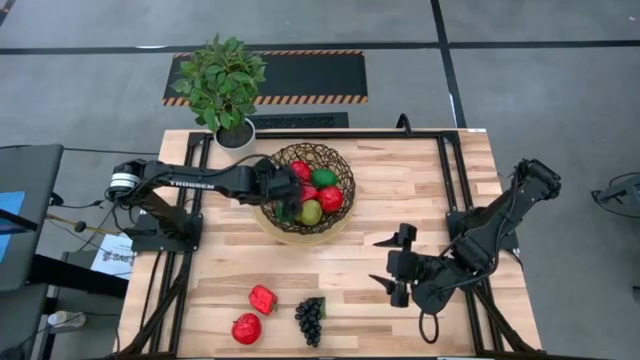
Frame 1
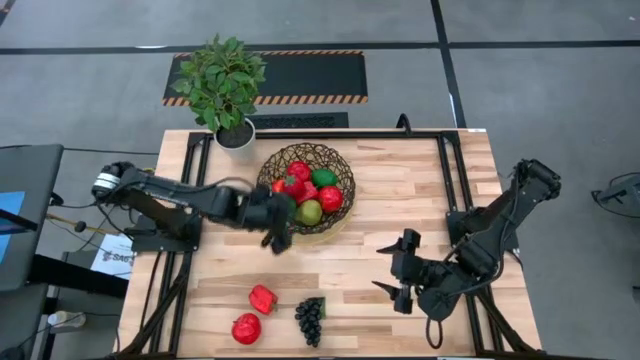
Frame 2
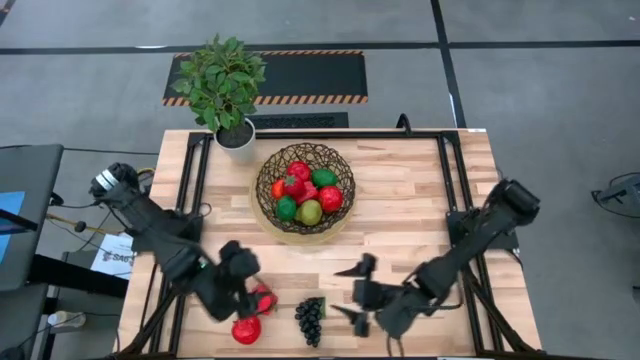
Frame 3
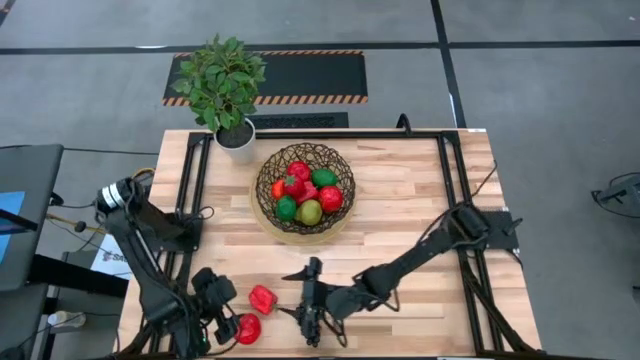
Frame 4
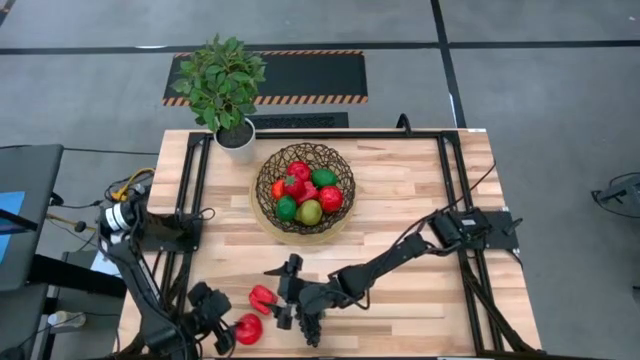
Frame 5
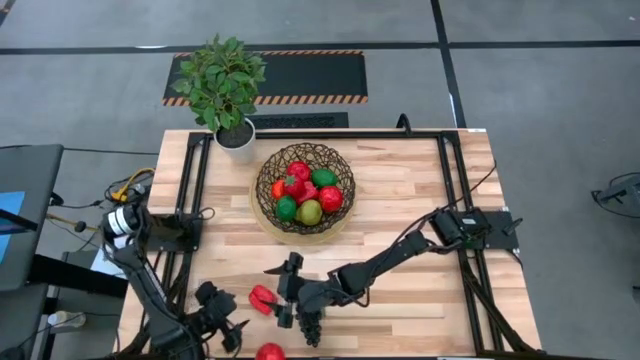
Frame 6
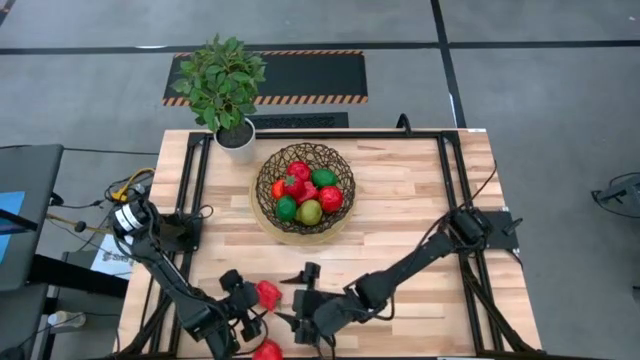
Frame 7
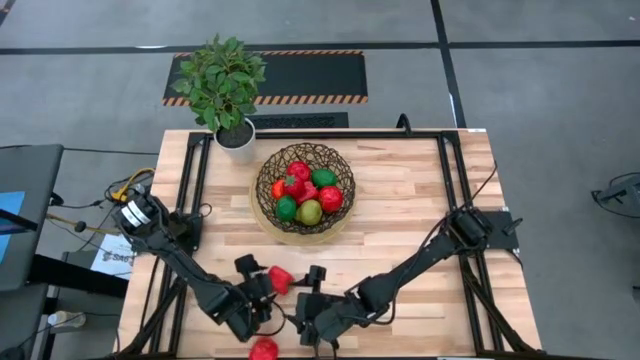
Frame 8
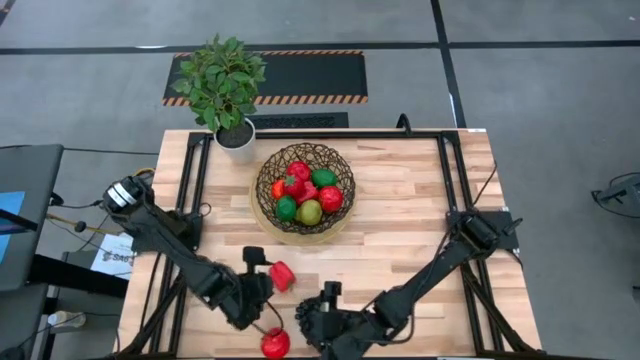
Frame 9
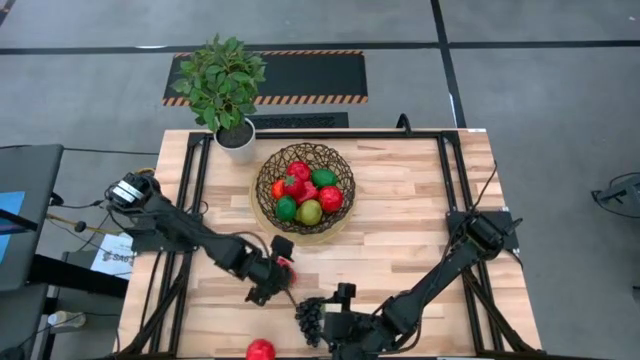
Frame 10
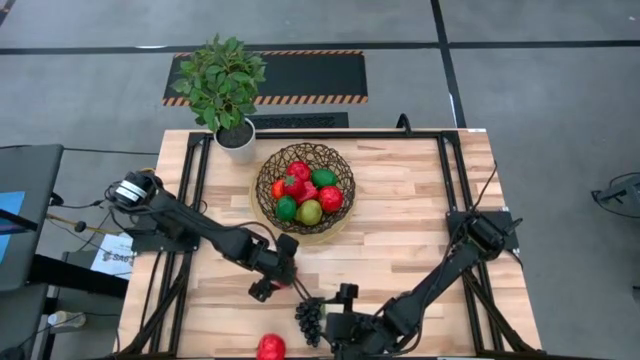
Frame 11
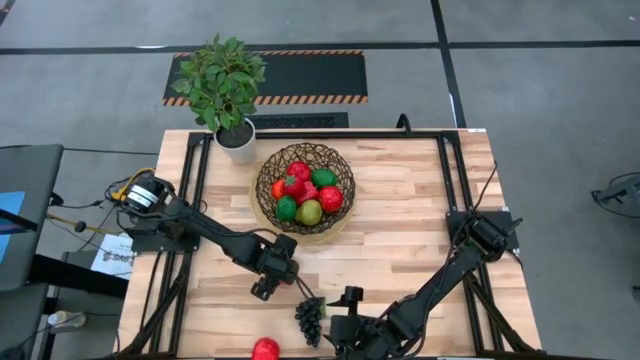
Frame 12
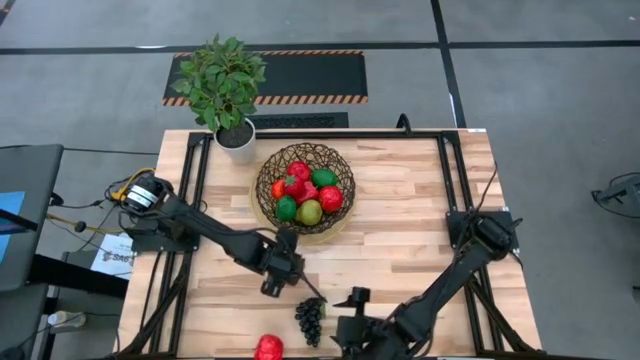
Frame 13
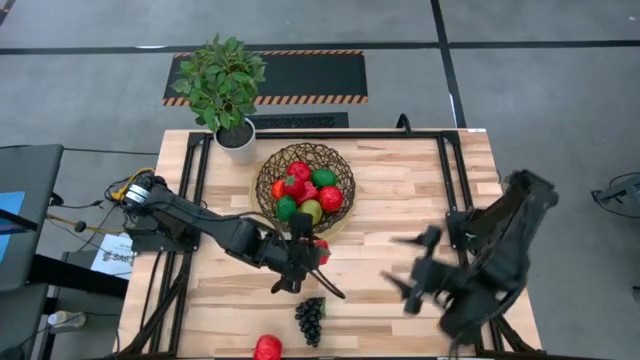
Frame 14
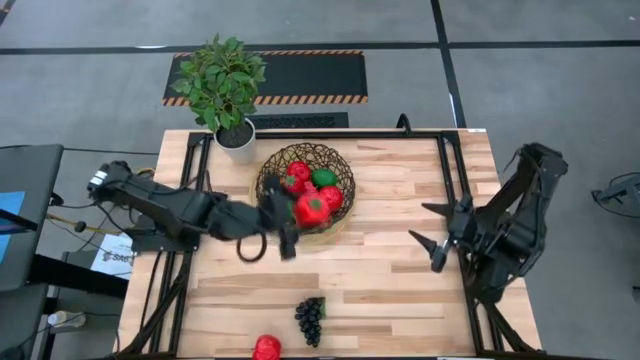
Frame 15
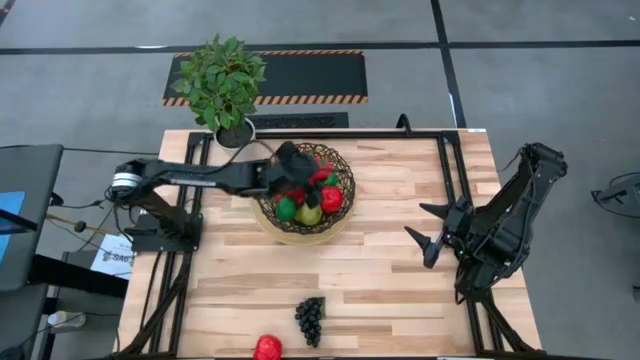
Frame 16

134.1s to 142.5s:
Task: Build produce basket
Put the red bell pepper into the basket

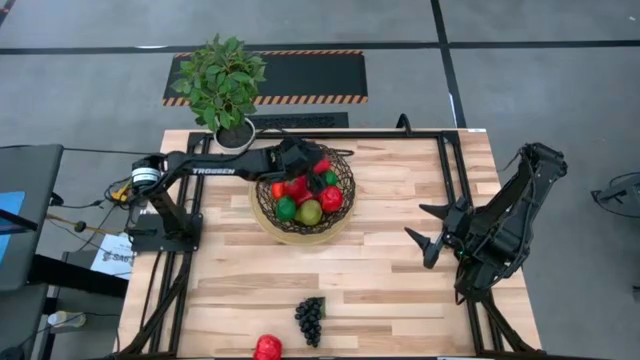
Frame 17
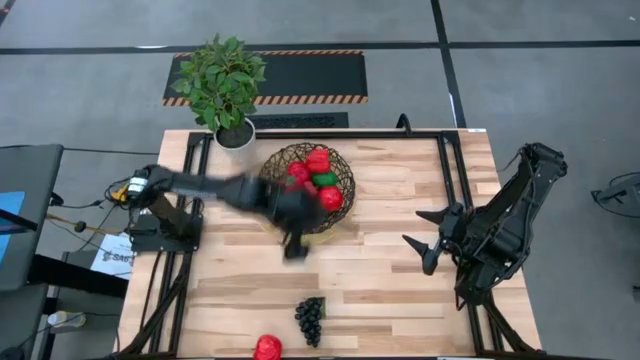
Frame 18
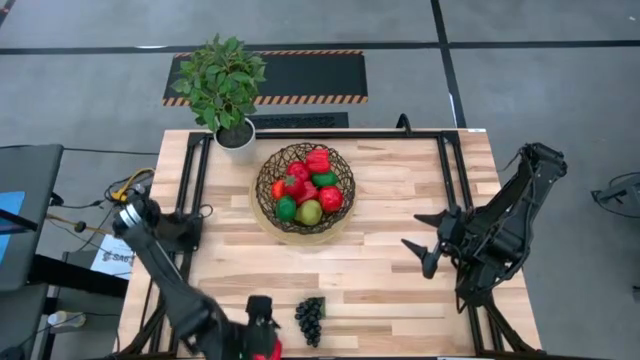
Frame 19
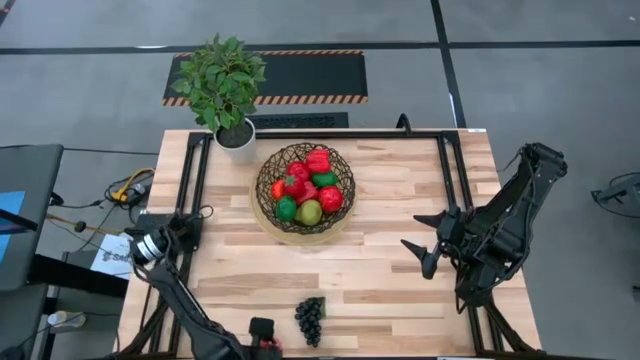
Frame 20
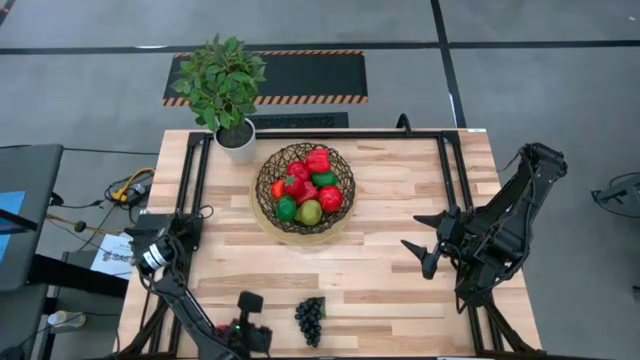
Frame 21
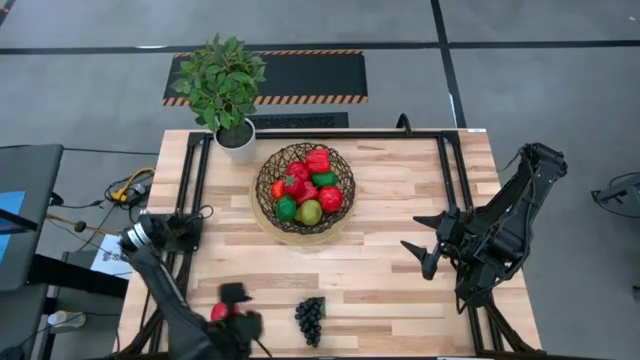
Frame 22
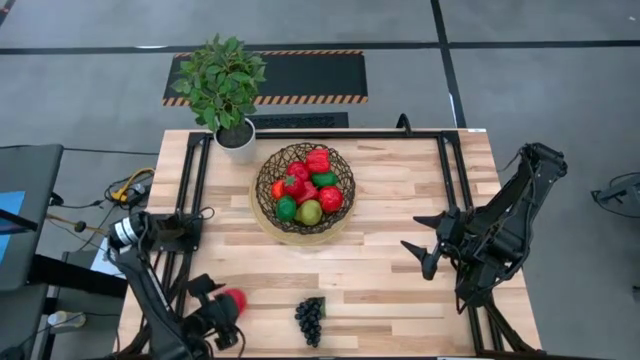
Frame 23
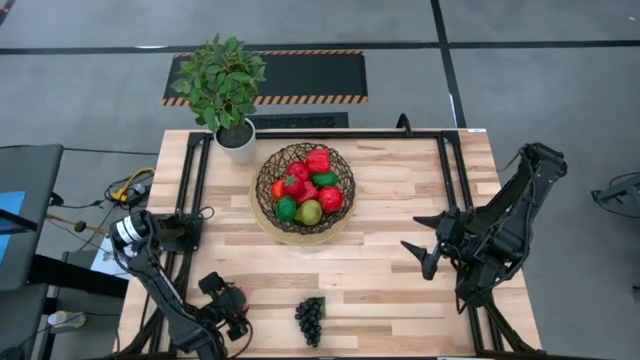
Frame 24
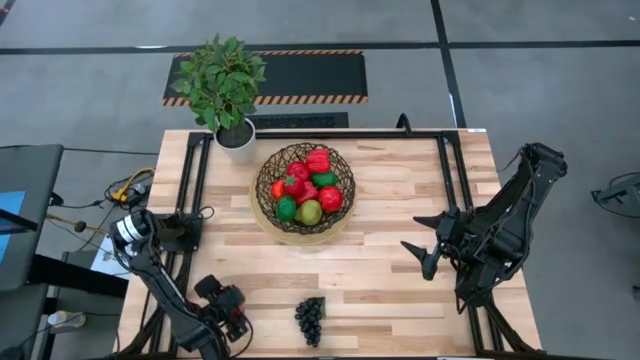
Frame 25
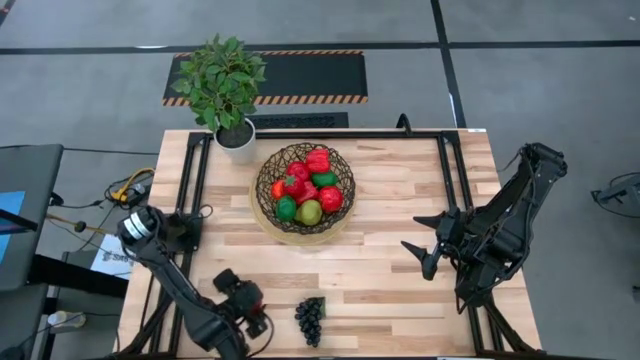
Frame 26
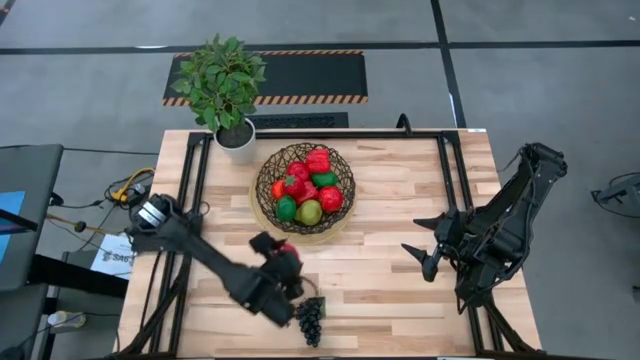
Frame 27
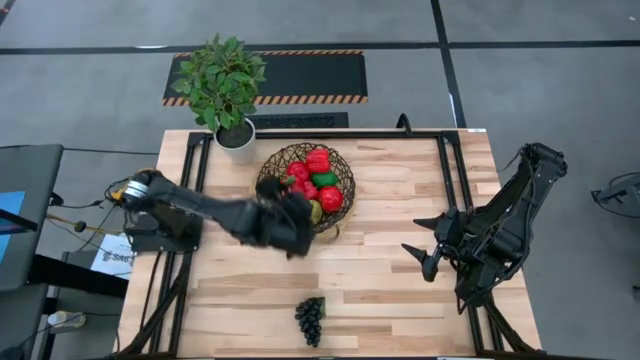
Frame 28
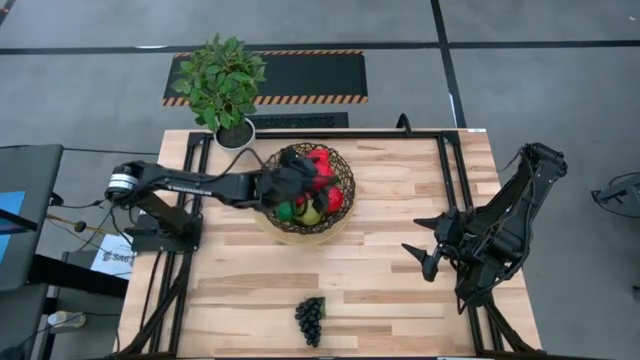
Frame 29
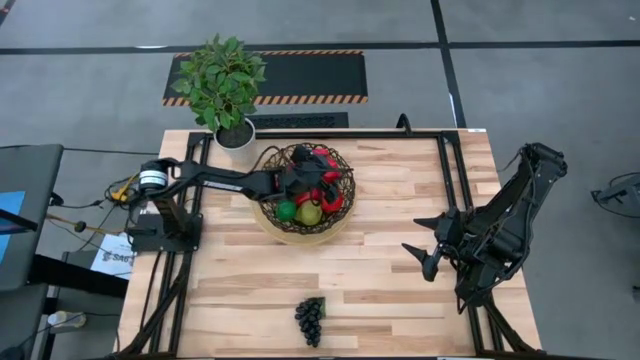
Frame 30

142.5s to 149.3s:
Put the red apple into the basket

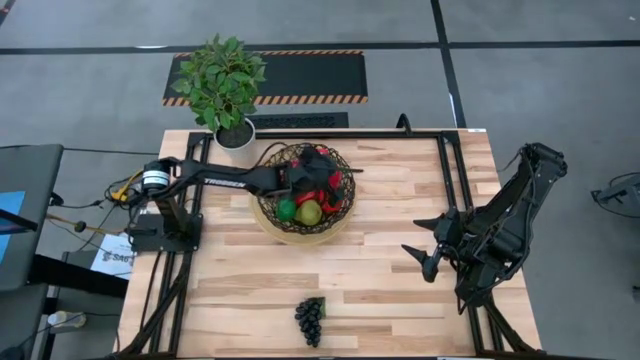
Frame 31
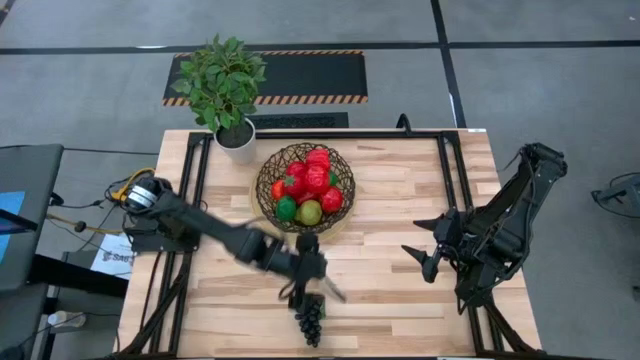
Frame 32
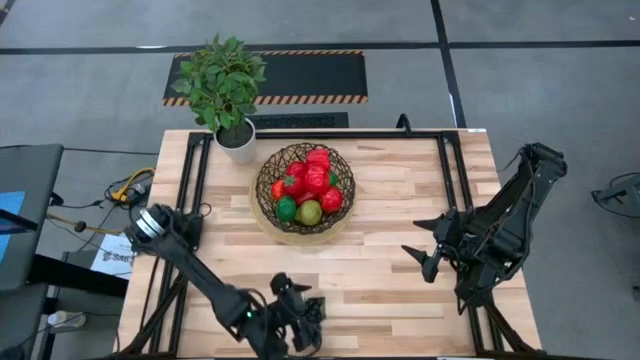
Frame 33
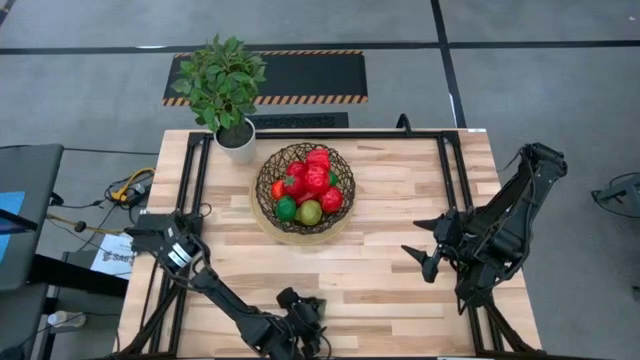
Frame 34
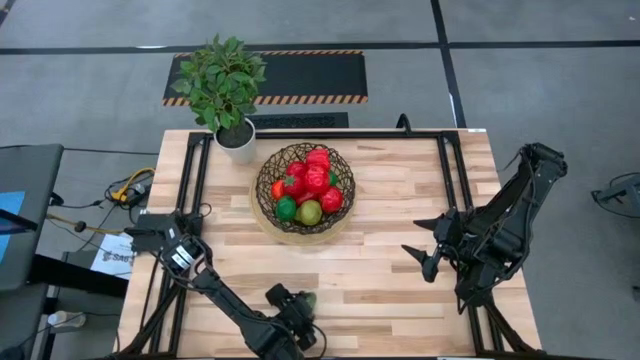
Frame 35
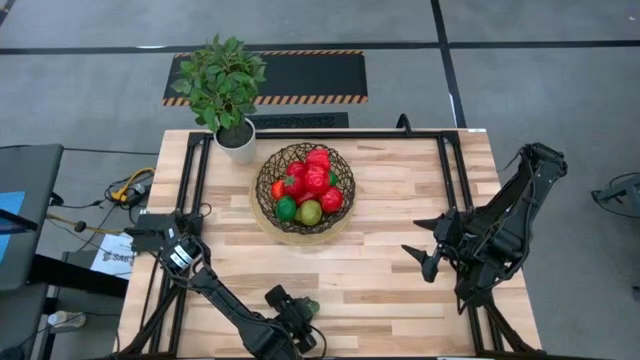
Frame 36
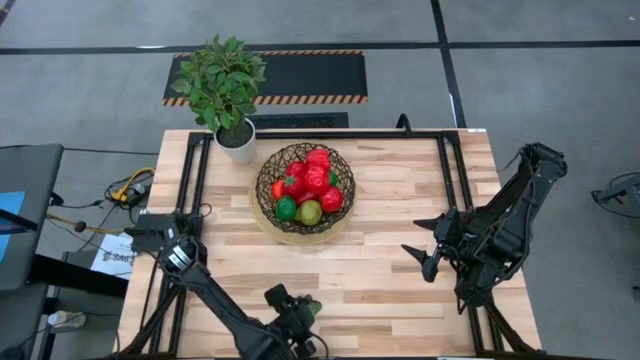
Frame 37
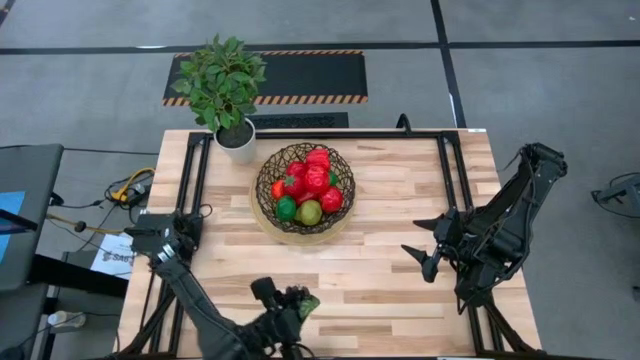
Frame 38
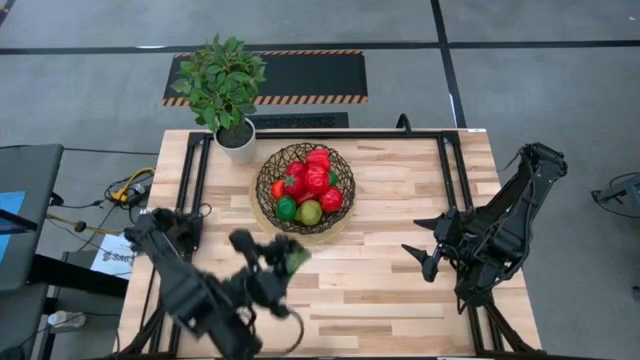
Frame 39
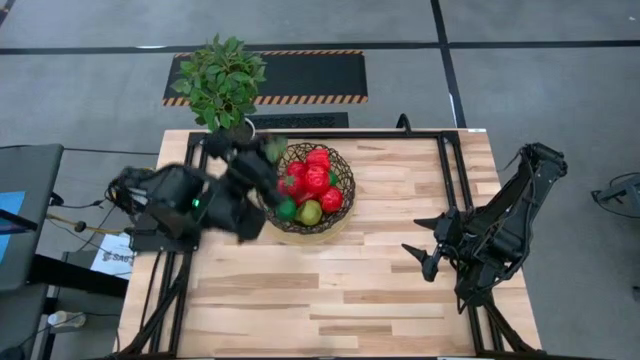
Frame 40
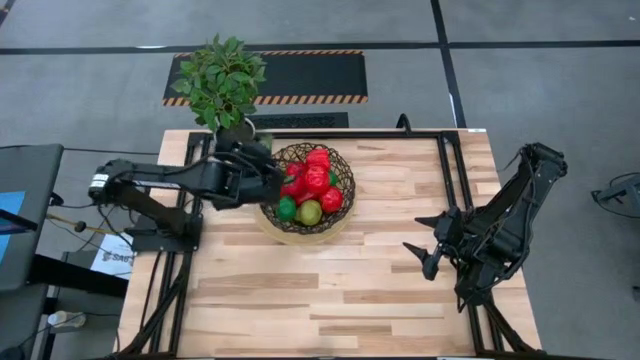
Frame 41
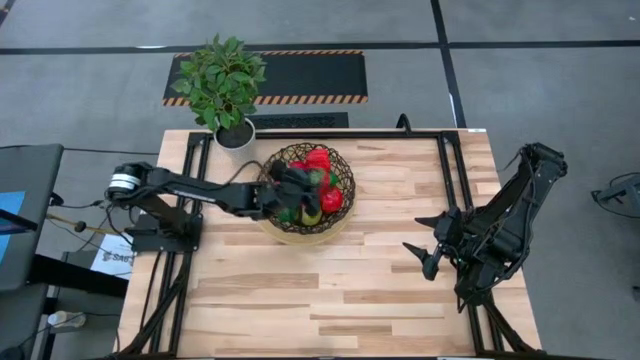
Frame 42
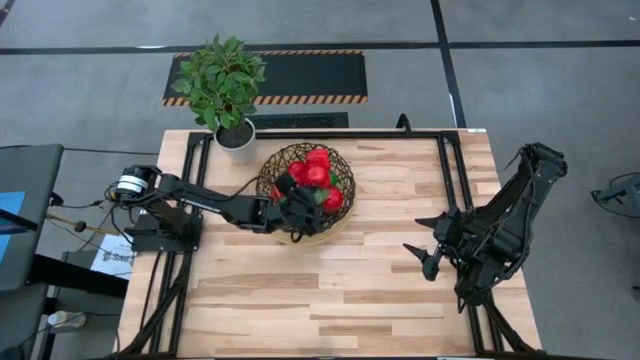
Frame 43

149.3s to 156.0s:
Put the black grapes into the basket

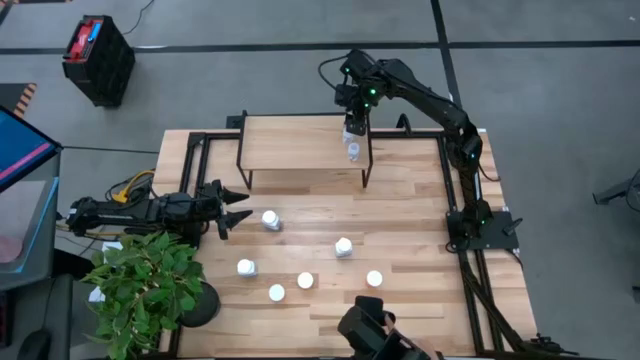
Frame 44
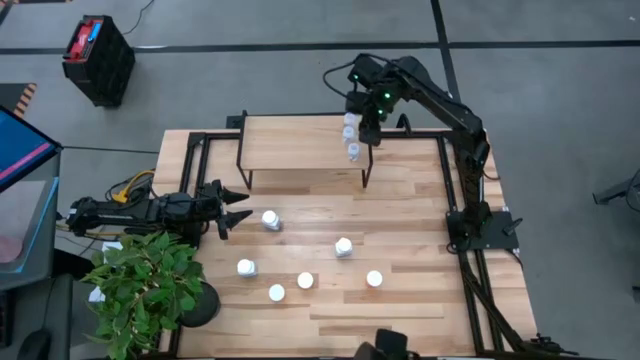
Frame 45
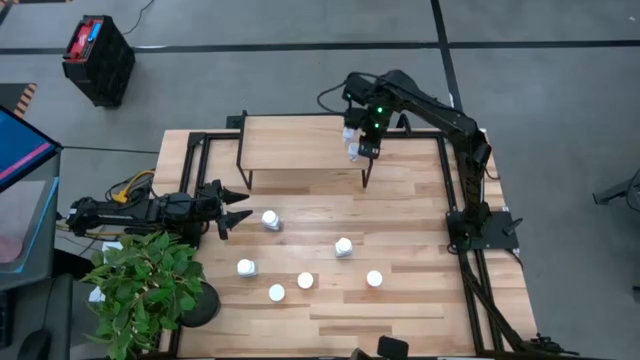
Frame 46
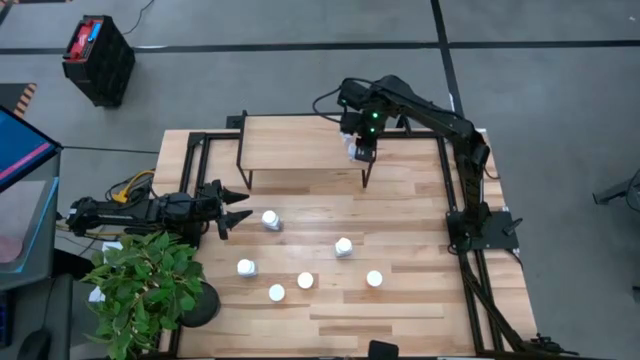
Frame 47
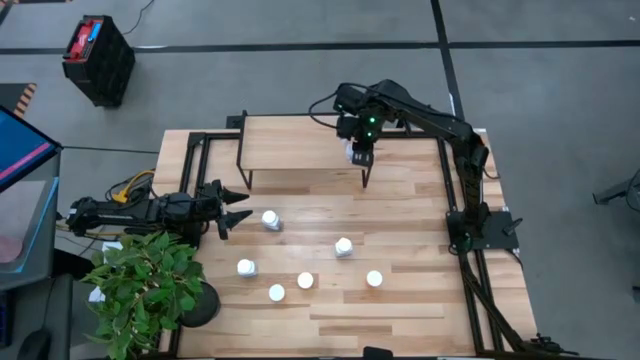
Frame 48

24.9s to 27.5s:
Task: Pick and place medicine bottles onto shelf by color
Adjust the transparent pill bottle on the shelf
